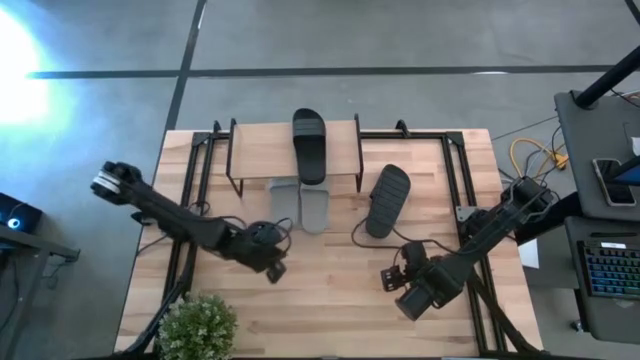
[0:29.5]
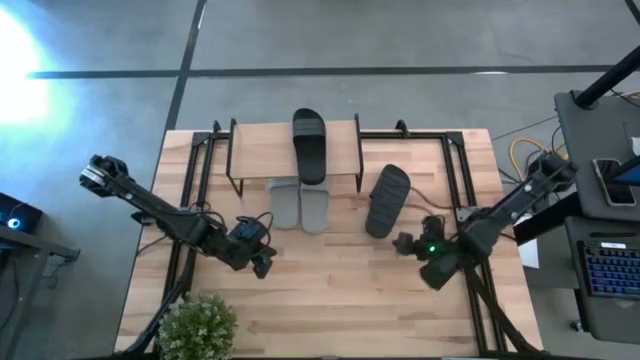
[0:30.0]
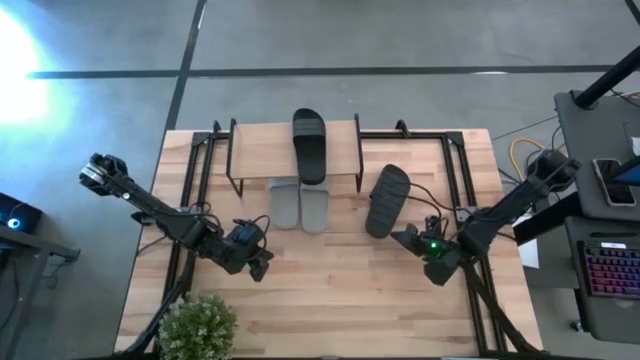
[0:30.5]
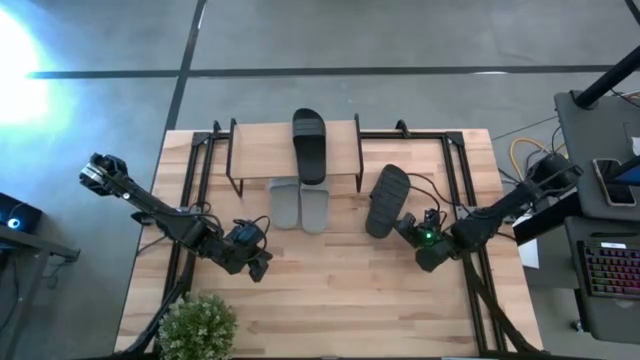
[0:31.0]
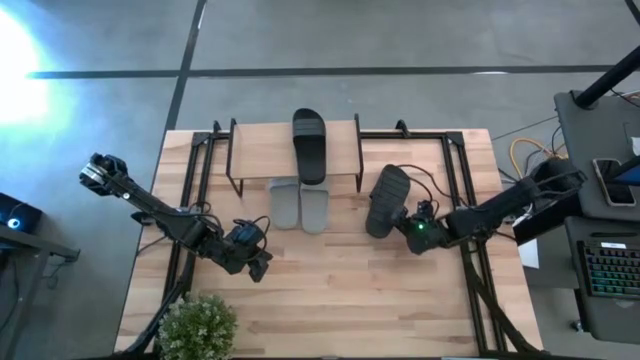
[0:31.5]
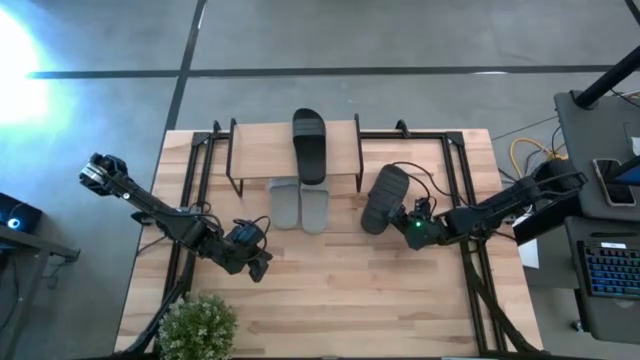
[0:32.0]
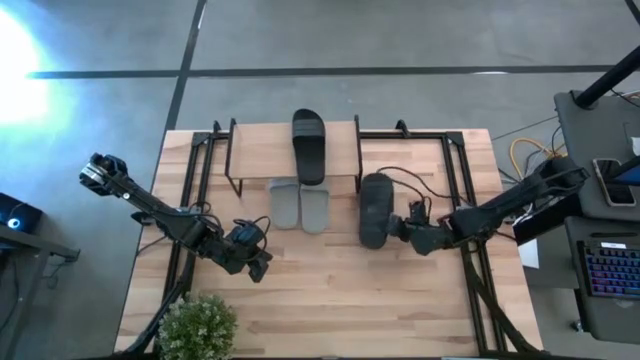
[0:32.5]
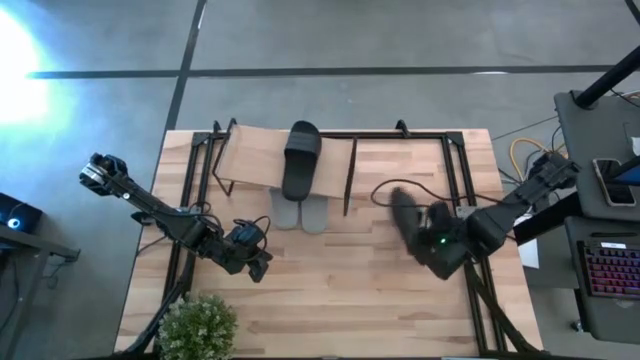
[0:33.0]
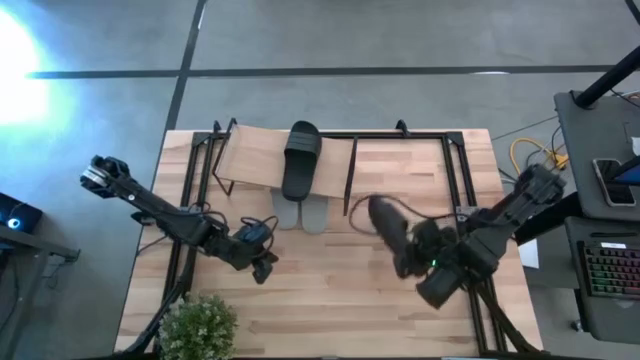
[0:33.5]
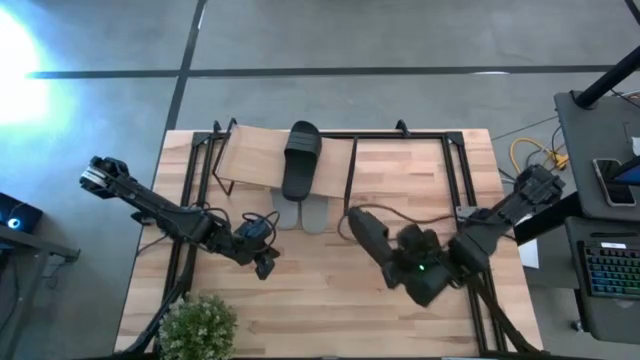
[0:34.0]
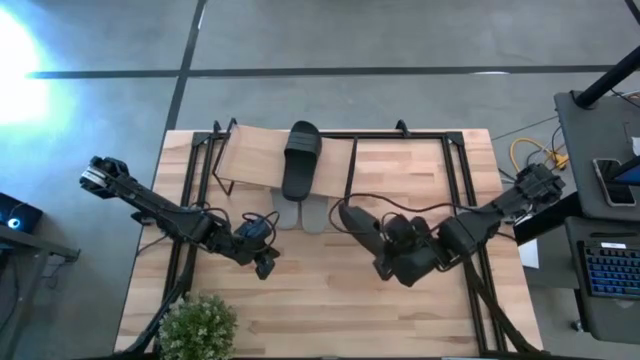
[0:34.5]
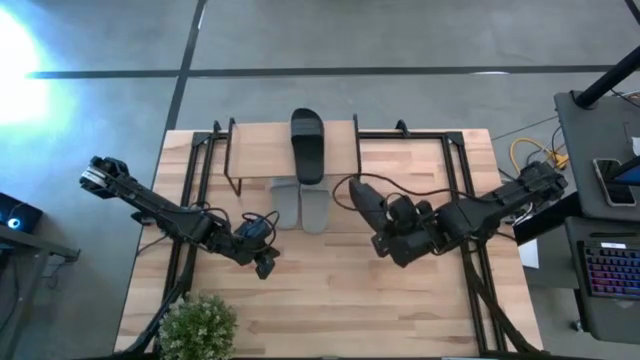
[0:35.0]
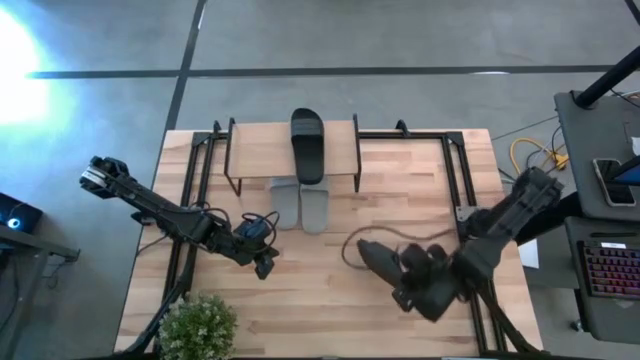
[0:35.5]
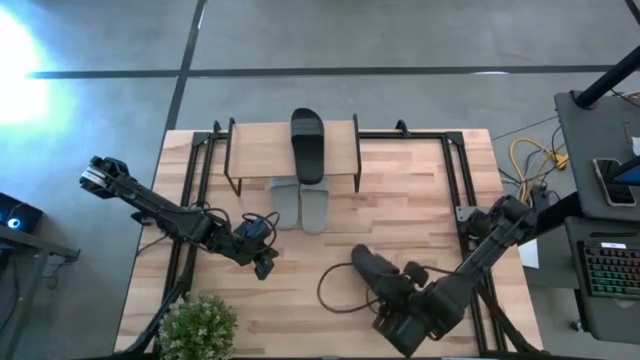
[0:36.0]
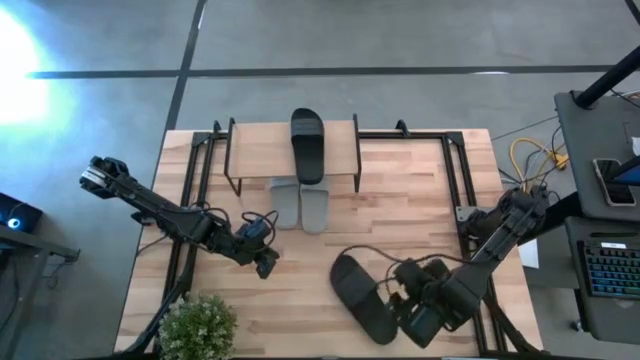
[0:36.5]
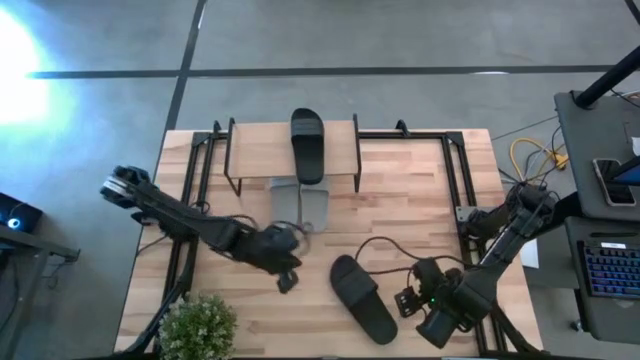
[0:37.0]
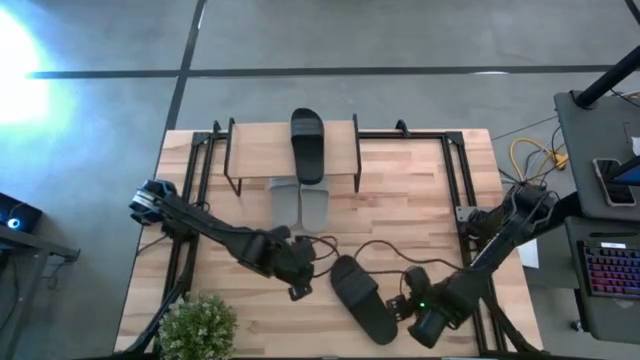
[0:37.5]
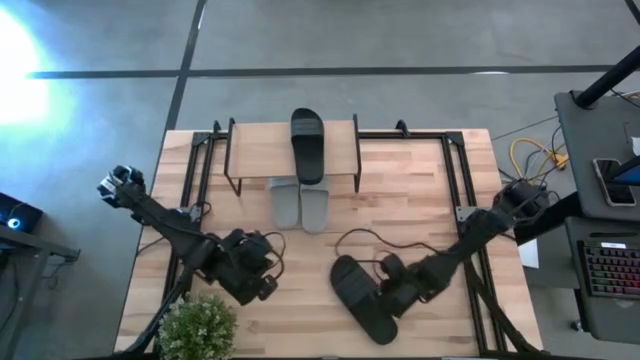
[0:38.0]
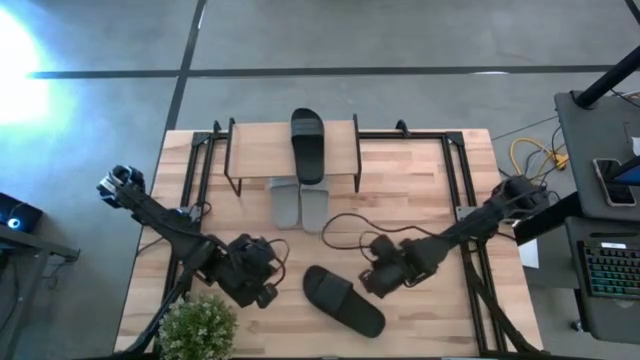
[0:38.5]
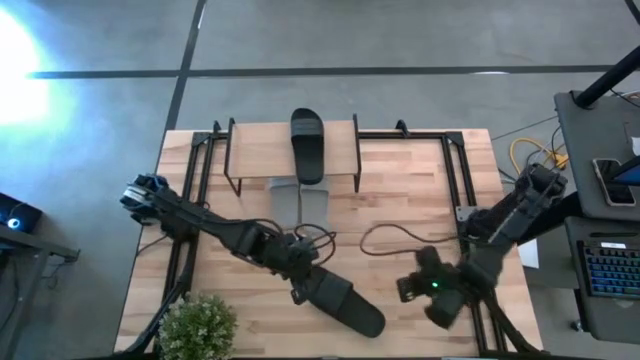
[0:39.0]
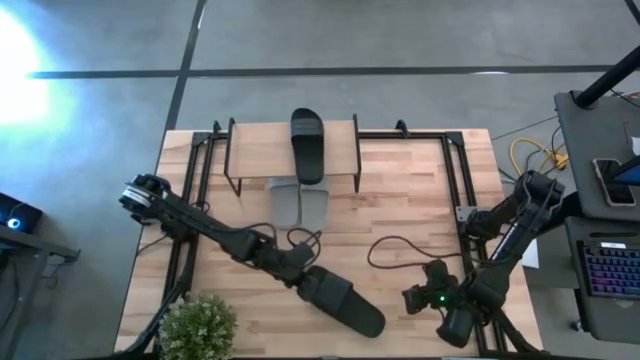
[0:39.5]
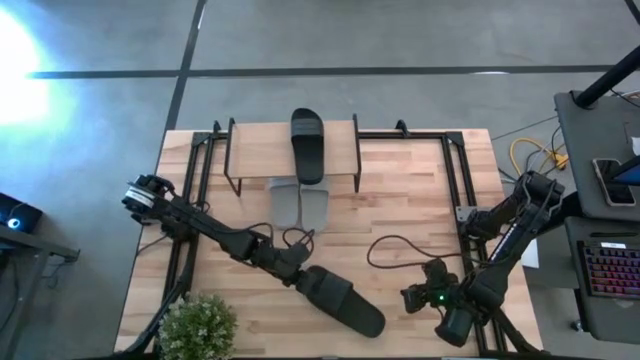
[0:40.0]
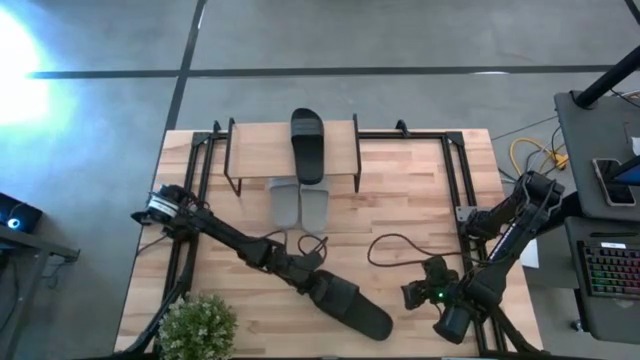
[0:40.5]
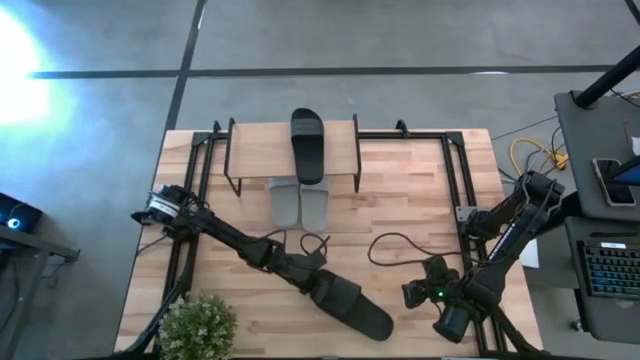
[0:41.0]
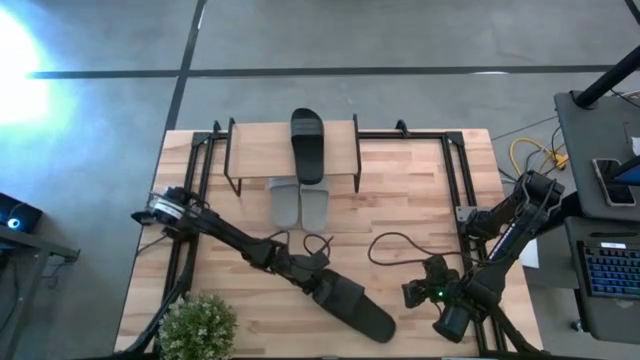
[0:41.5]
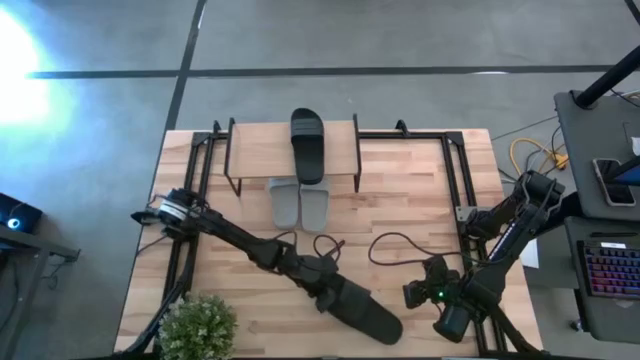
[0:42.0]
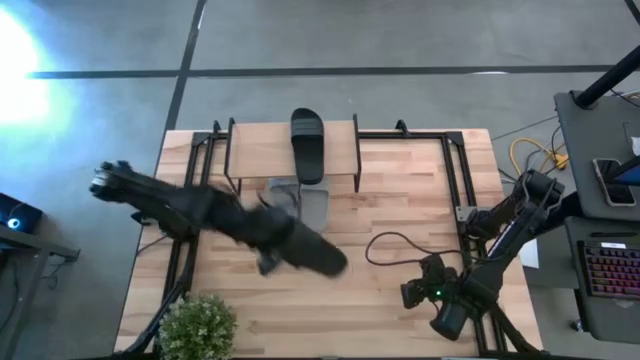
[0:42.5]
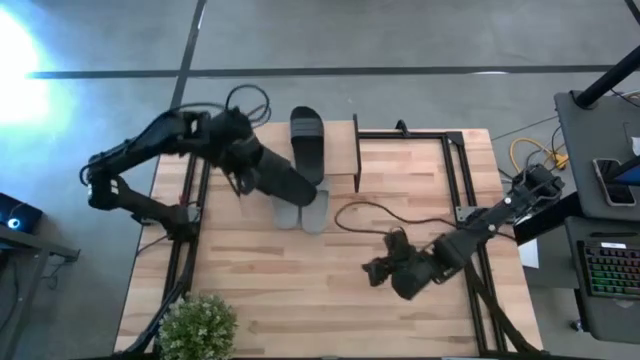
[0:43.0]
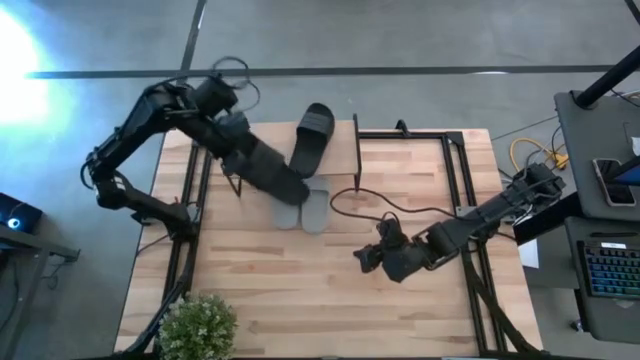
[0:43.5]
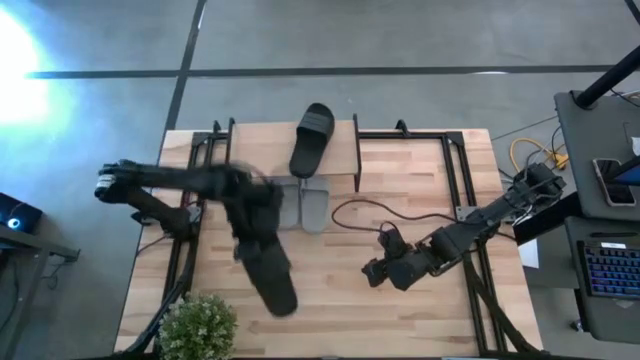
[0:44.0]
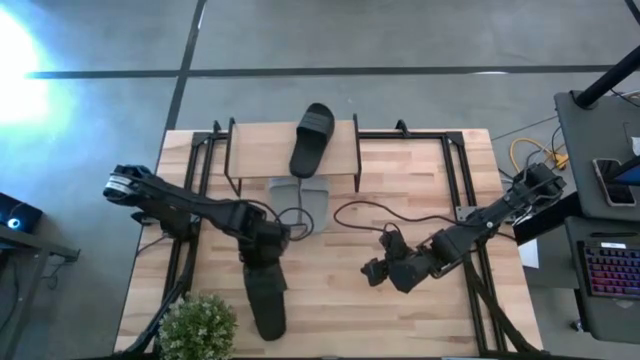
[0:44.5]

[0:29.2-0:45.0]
Task: Pick and place slides into the shelf
Put the black slide on the shelf

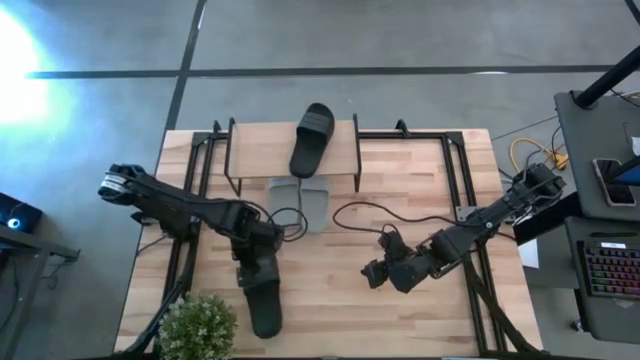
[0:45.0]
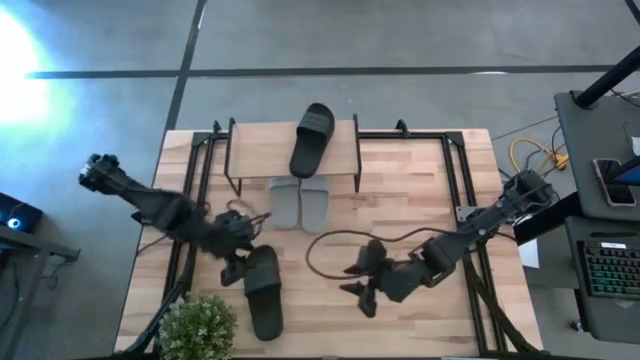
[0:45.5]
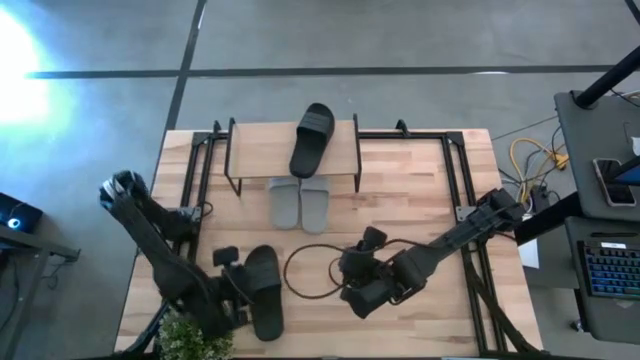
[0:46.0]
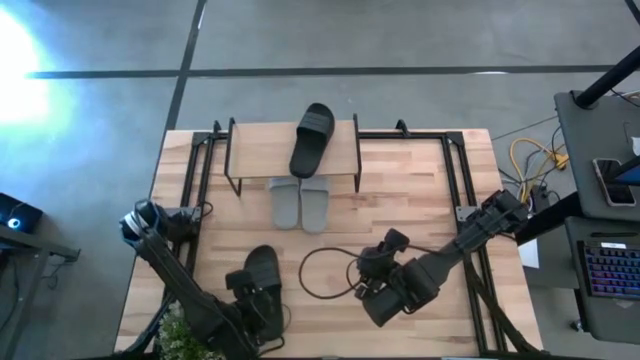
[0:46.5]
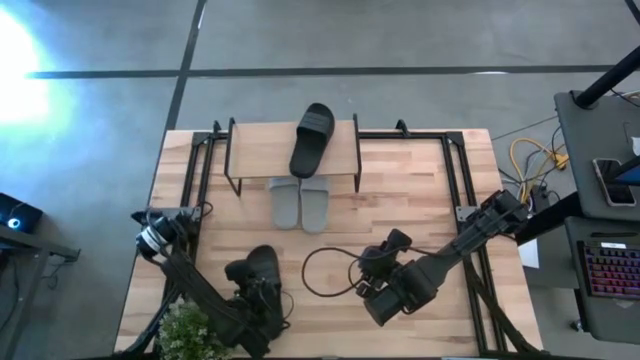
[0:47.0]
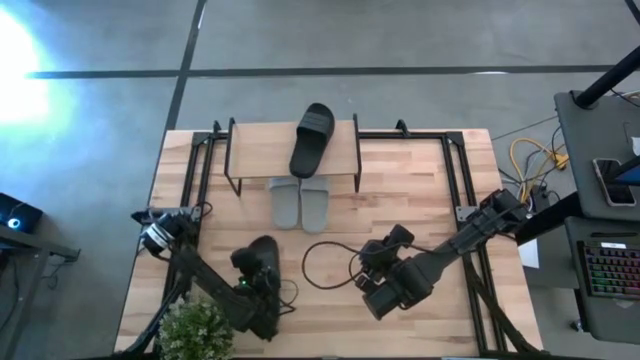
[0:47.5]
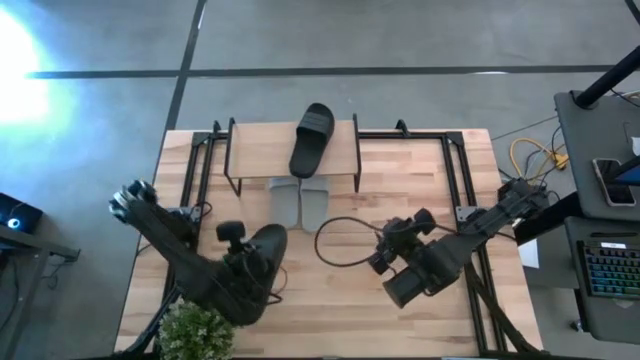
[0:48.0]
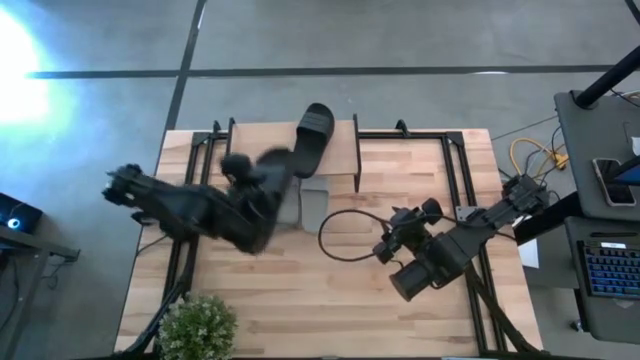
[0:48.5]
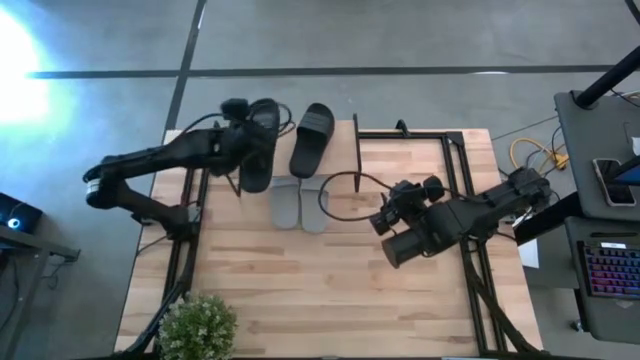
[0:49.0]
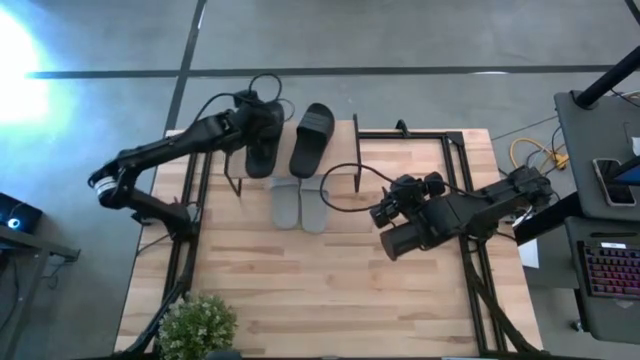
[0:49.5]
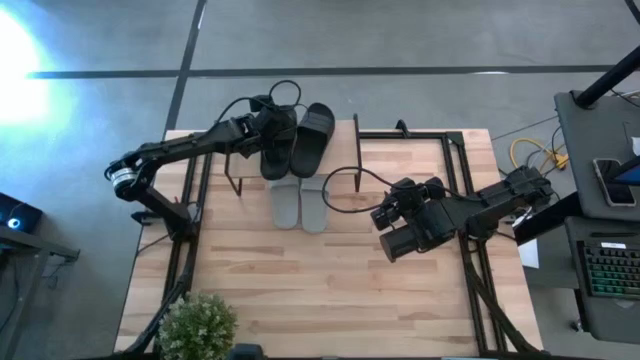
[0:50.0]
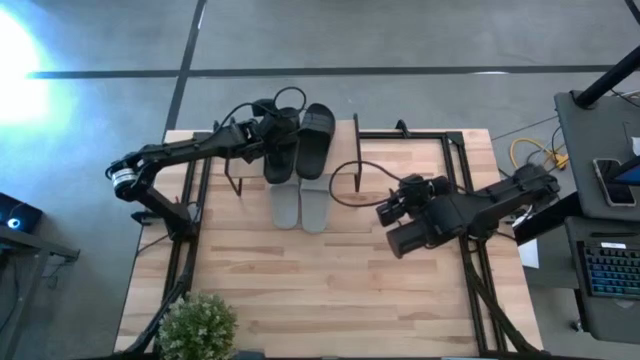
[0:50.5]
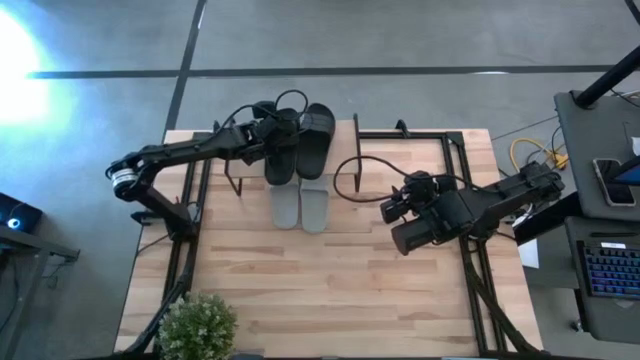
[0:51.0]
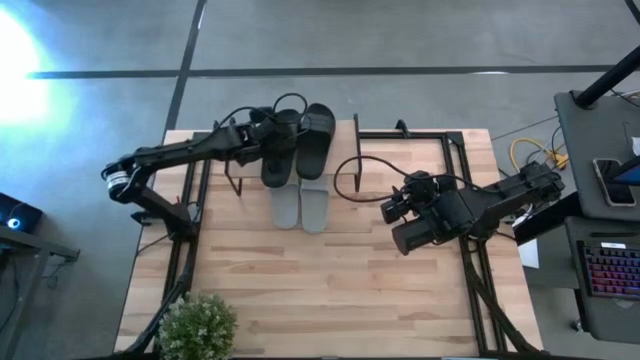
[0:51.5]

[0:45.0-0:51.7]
Put the black slide on the shelf
